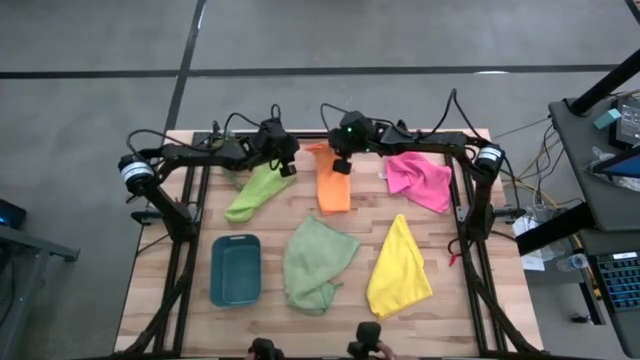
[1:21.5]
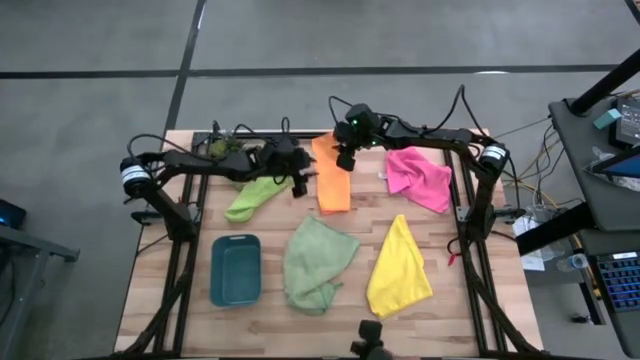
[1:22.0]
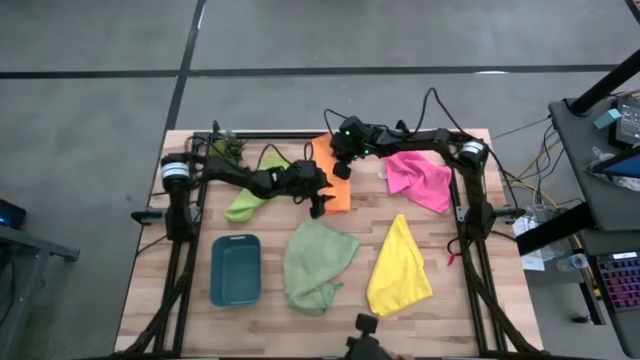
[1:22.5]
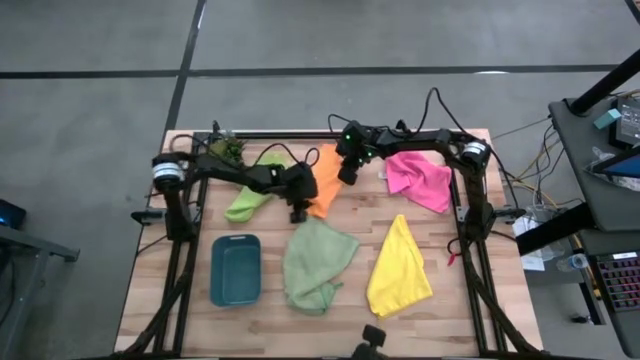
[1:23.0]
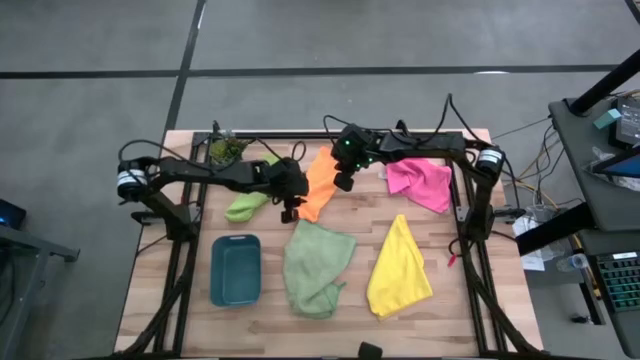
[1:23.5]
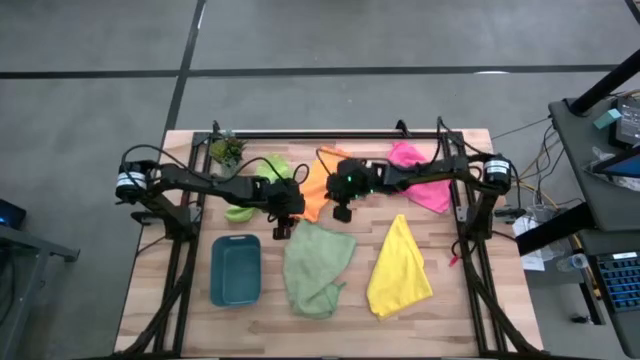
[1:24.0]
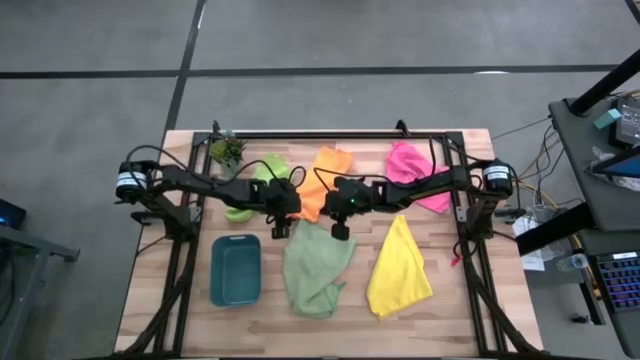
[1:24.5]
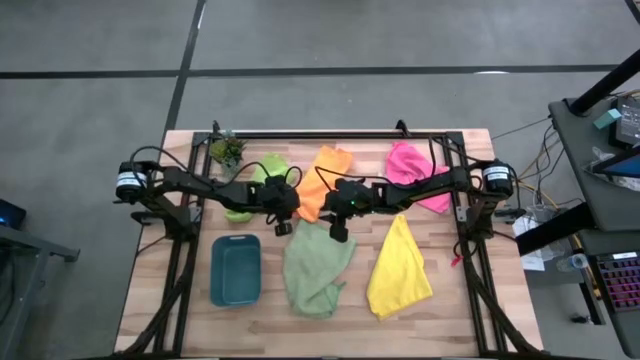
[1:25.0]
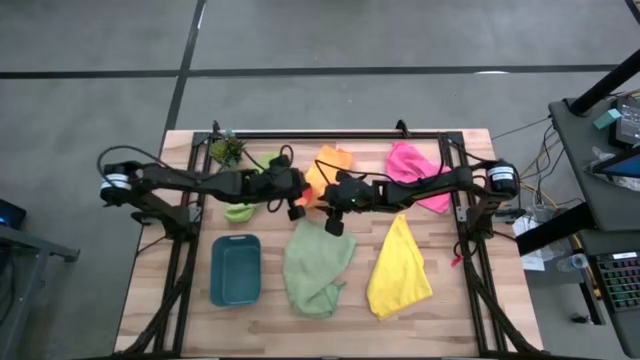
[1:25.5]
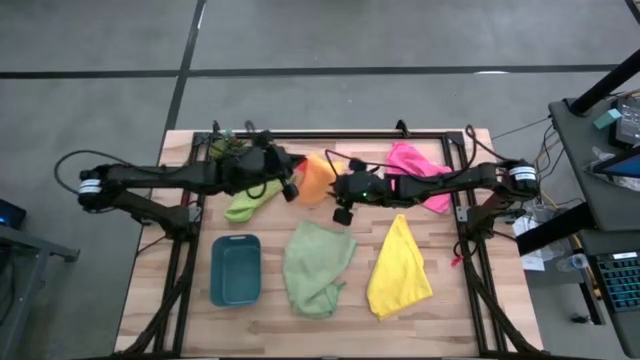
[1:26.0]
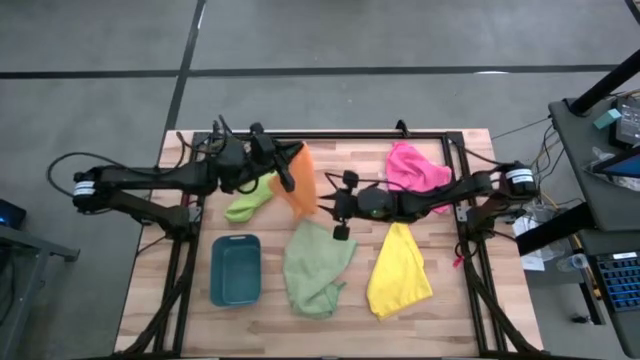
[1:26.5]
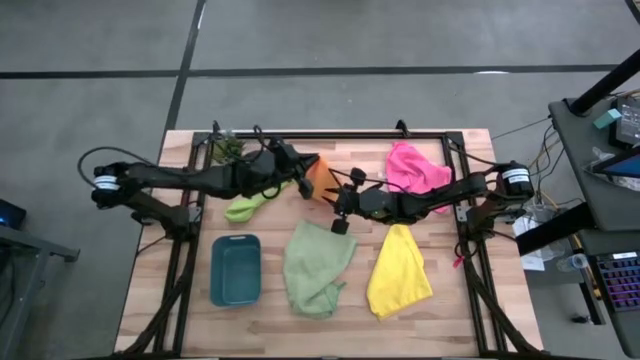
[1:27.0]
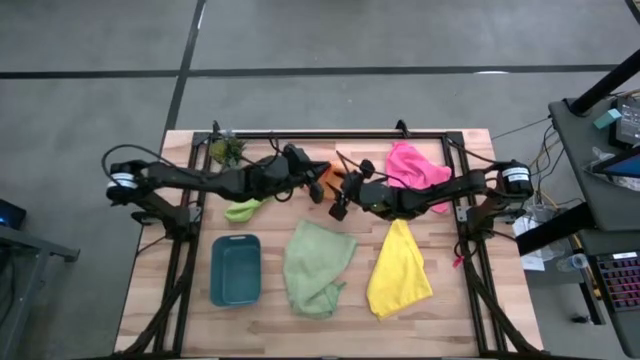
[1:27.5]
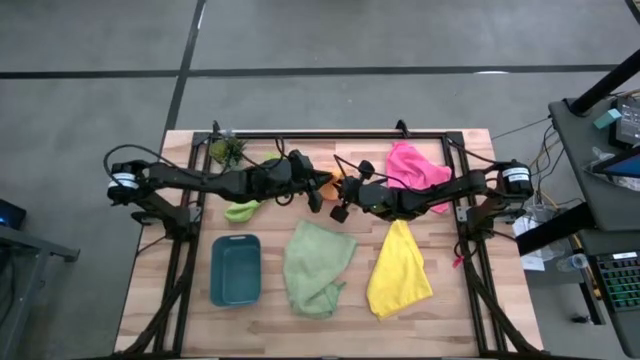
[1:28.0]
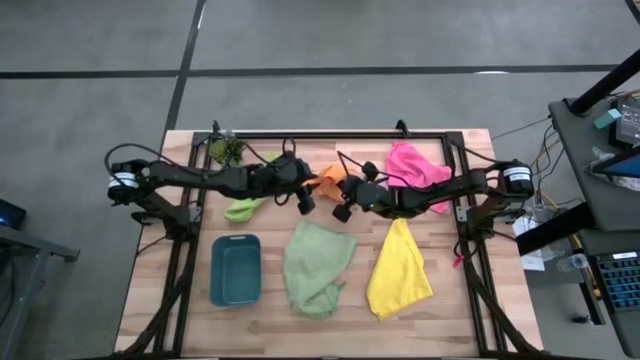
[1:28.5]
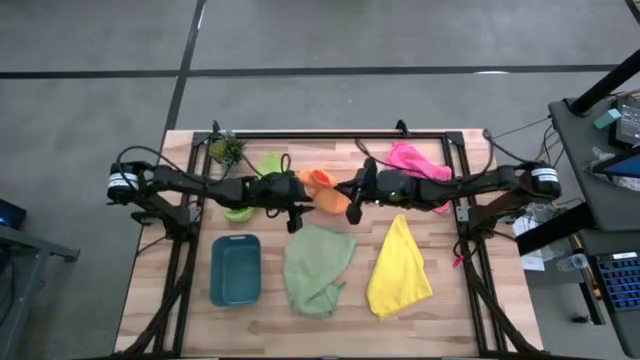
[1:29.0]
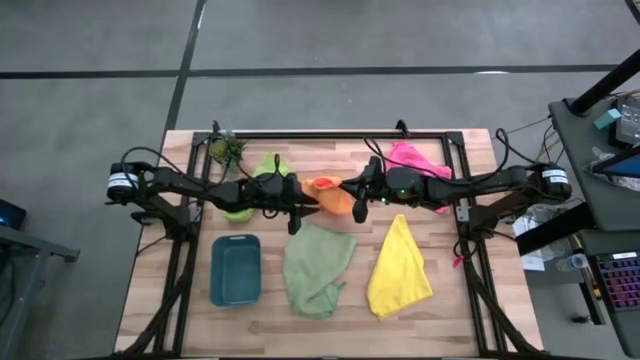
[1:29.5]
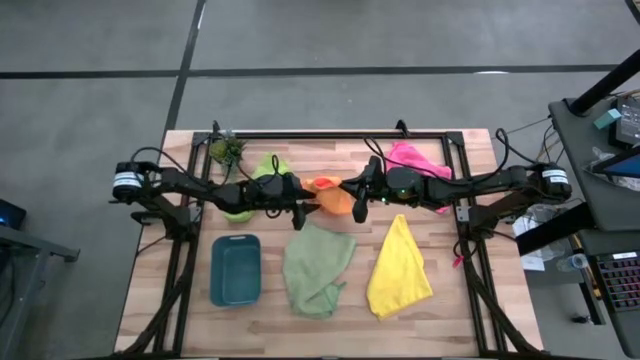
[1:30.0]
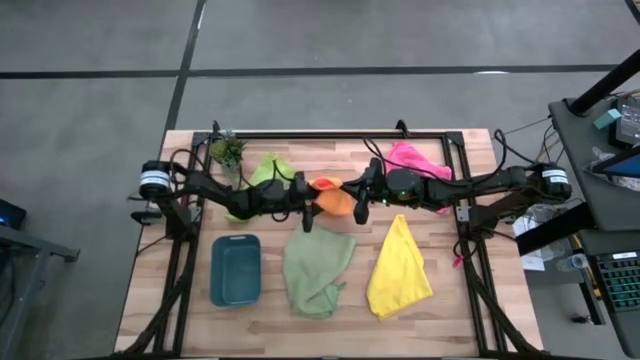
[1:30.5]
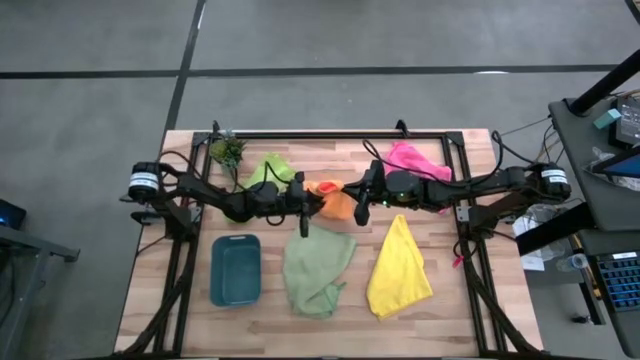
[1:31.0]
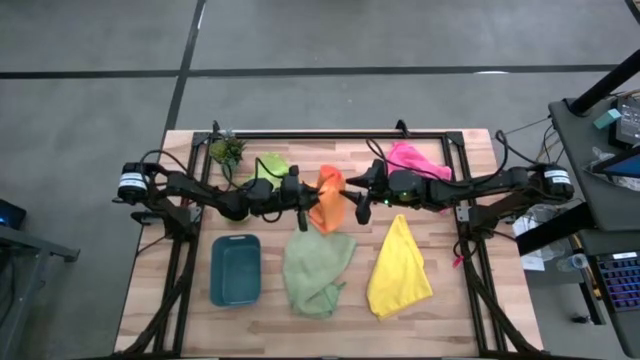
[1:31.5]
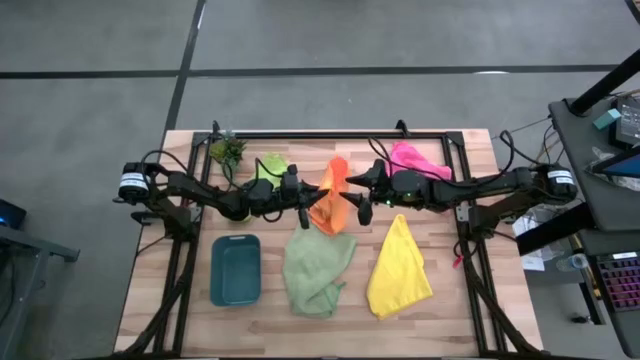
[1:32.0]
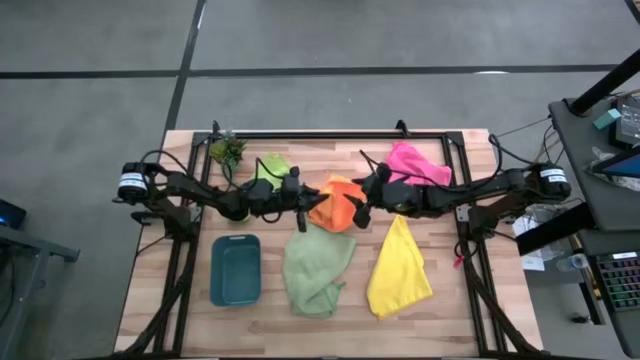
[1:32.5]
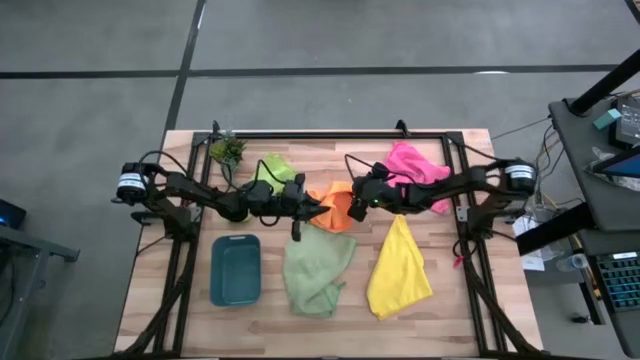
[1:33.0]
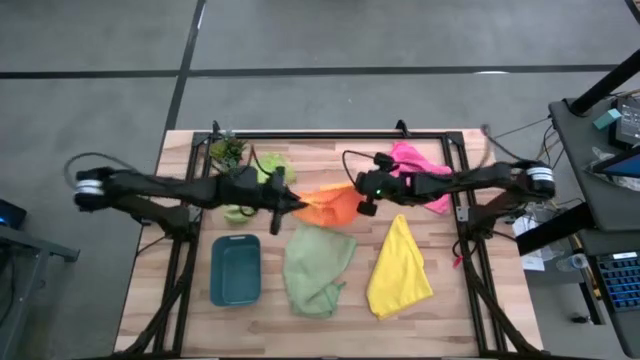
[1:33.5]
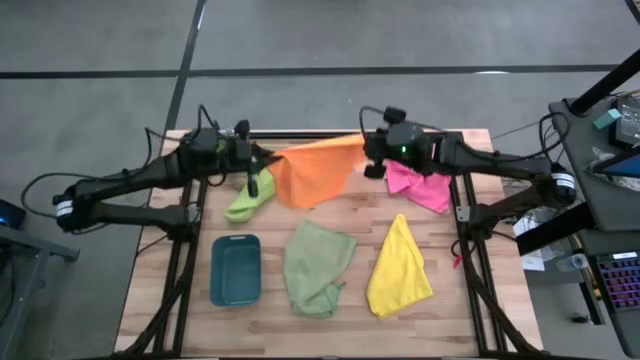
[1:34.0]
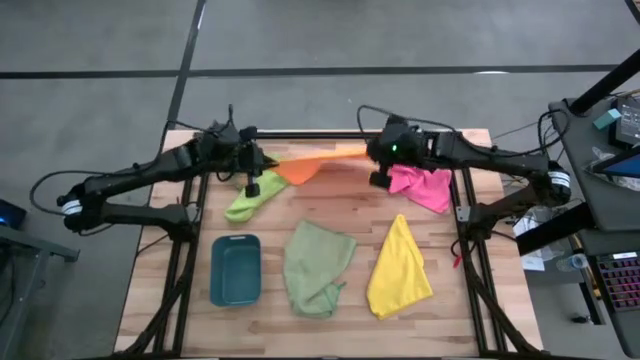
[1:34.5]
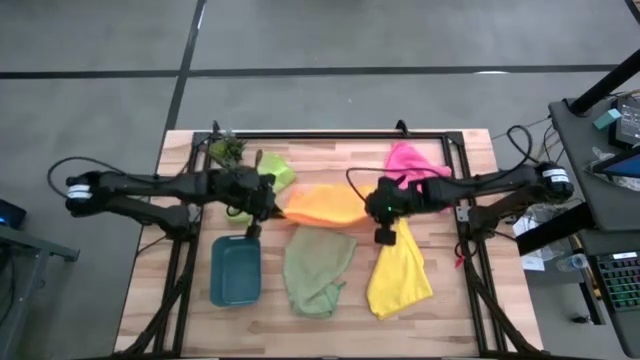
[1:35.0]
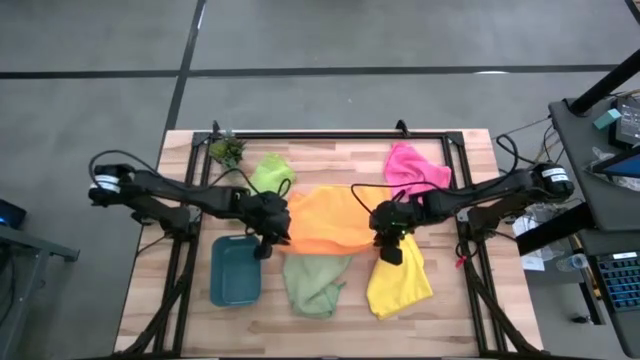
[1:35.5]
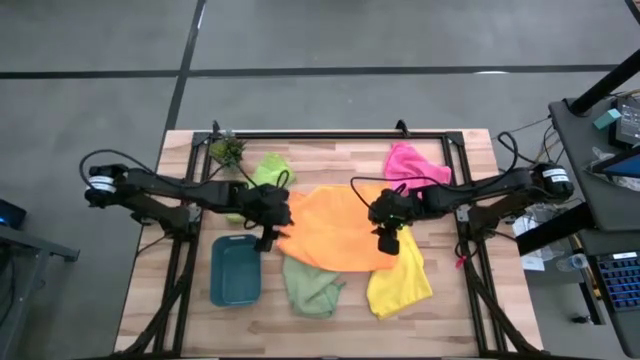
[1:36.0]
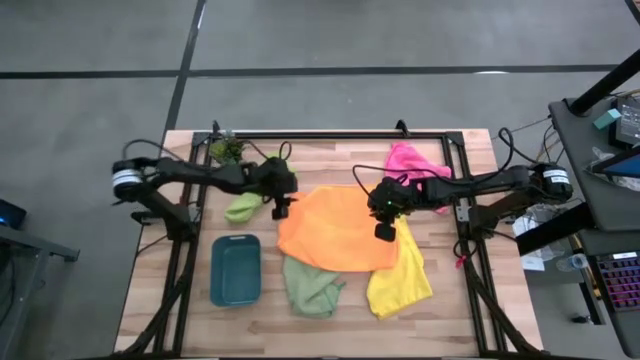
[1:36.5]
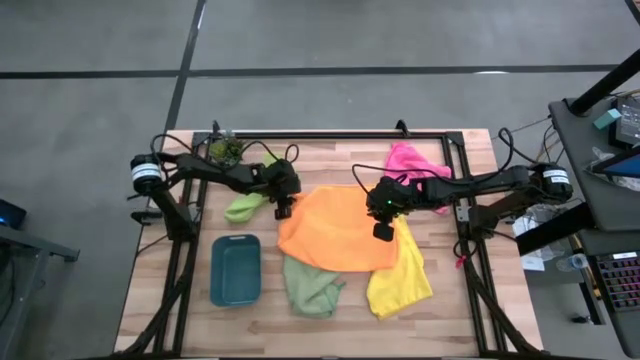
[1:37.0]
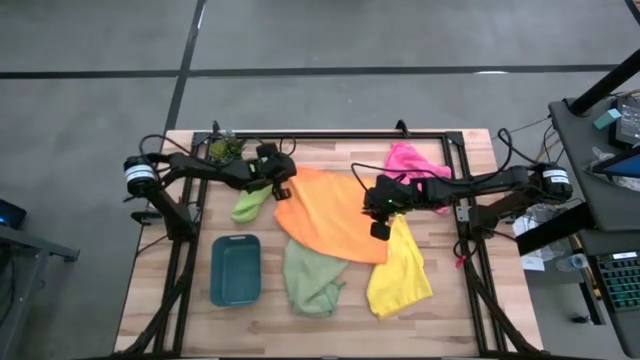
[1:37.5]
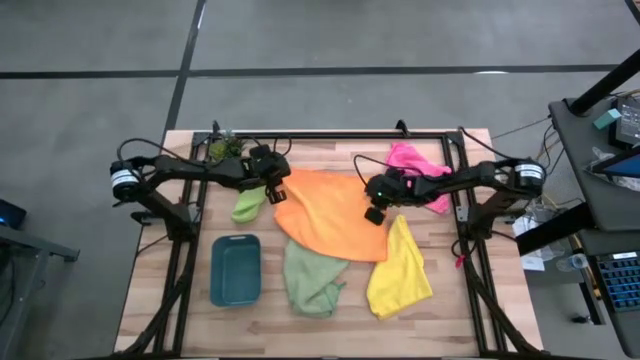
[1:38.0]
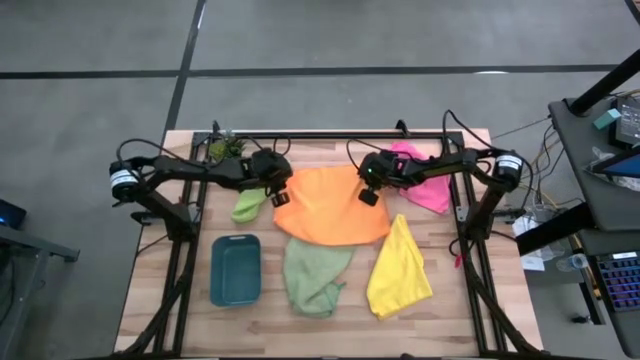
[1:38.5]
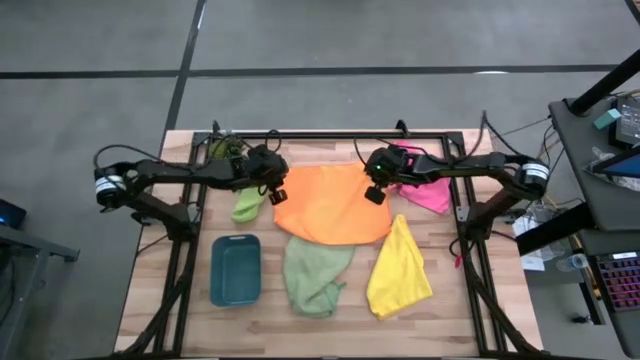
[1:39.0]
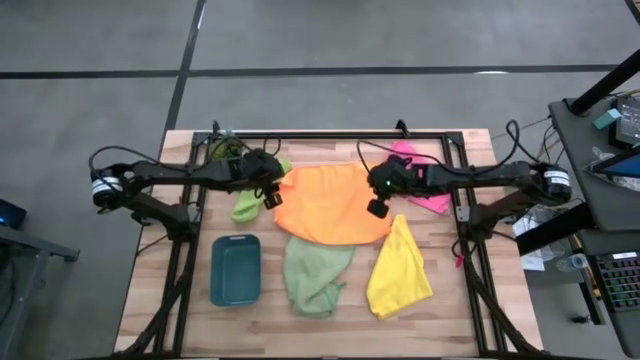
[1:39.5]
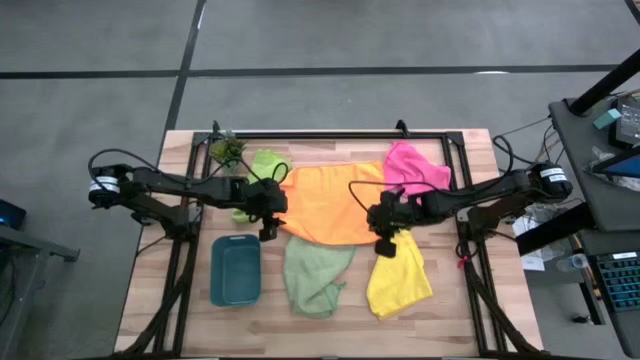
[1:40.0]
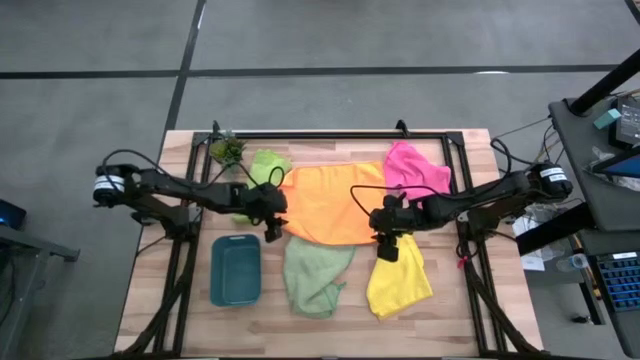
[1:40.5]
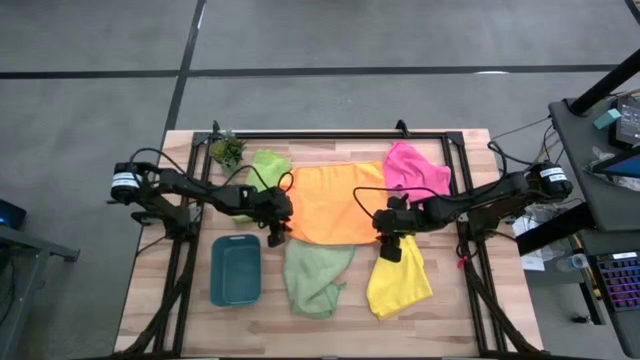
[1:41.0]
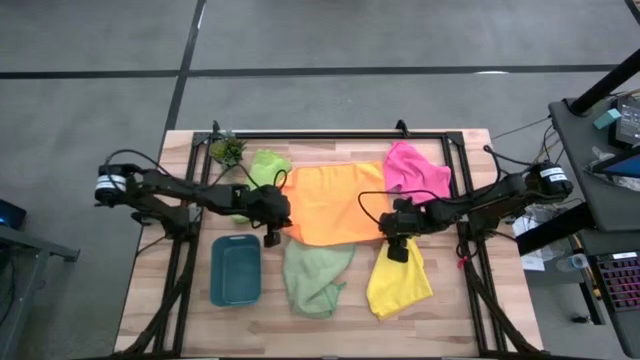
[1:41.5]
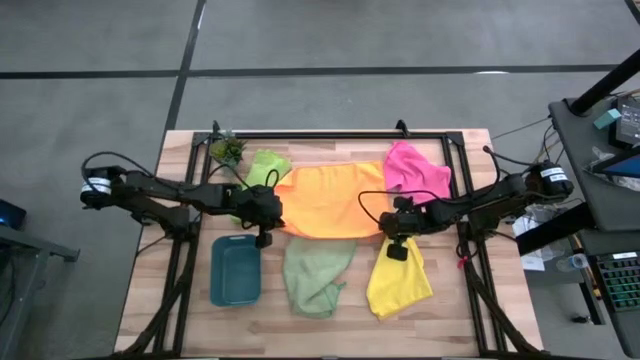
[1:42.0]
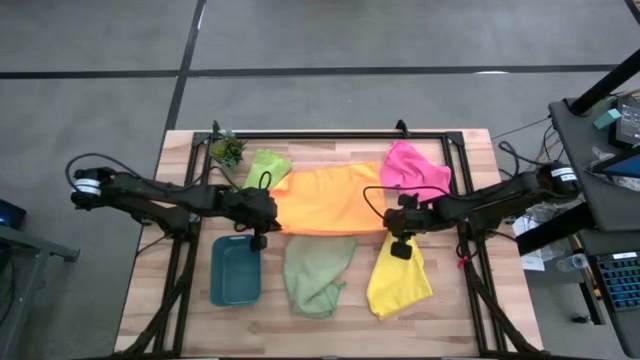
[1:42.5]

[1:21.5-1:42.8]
Task: Fold microfiber towels
Fold the orange microfiber cloth
